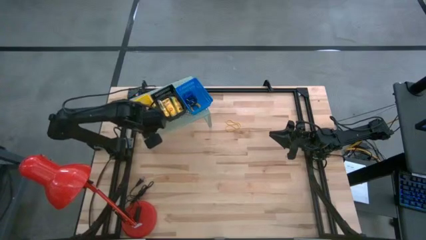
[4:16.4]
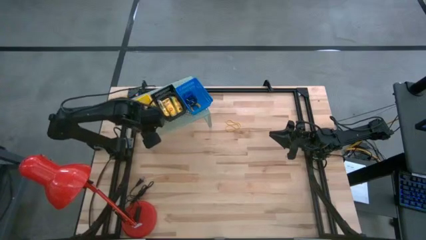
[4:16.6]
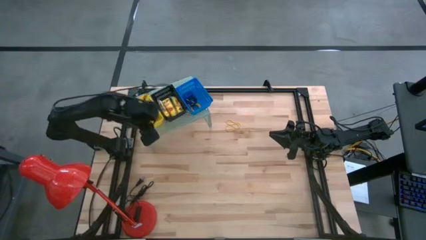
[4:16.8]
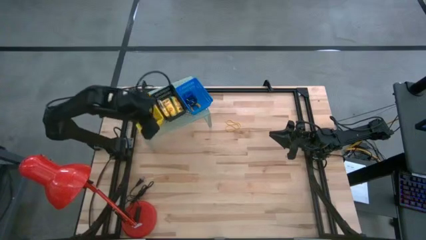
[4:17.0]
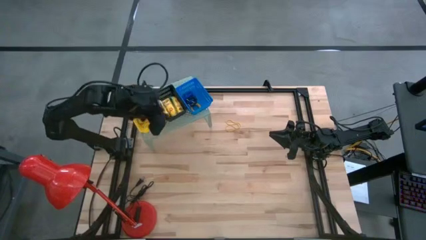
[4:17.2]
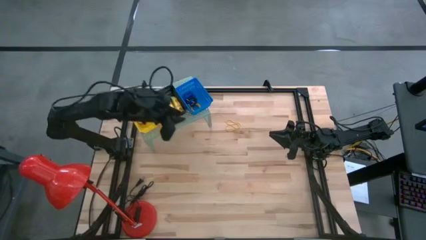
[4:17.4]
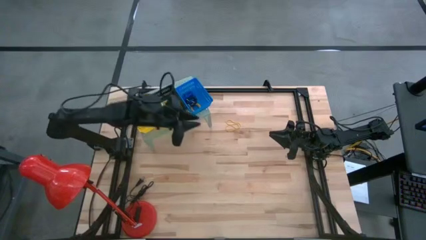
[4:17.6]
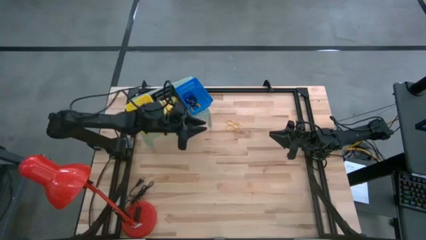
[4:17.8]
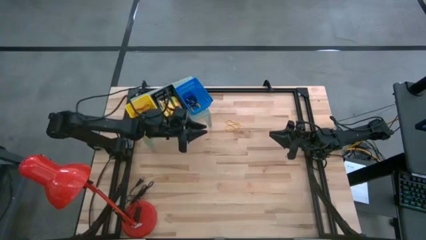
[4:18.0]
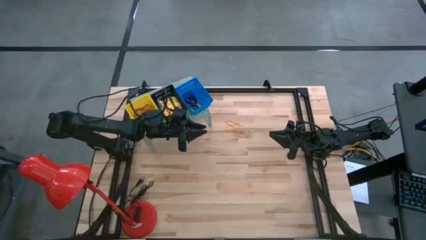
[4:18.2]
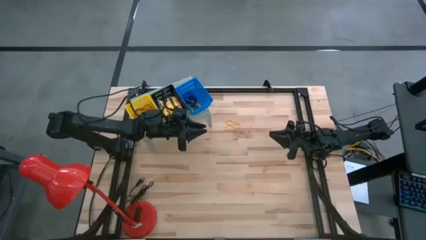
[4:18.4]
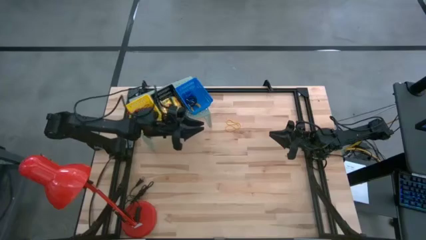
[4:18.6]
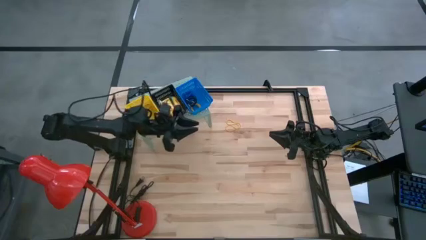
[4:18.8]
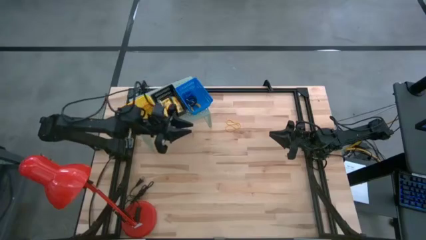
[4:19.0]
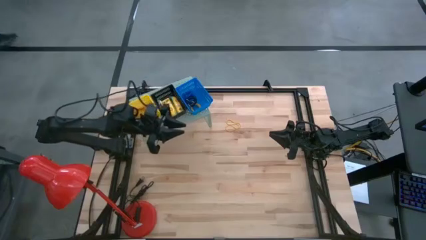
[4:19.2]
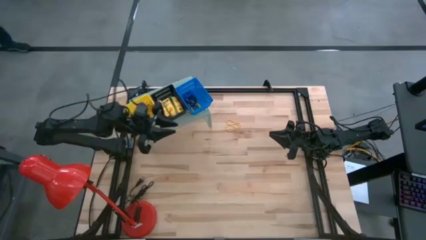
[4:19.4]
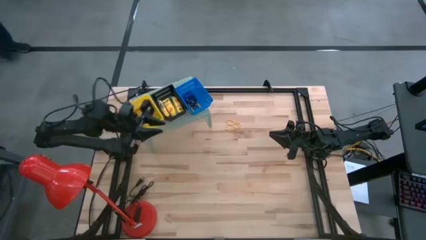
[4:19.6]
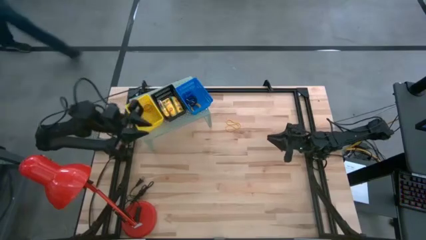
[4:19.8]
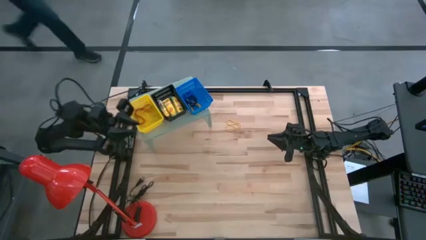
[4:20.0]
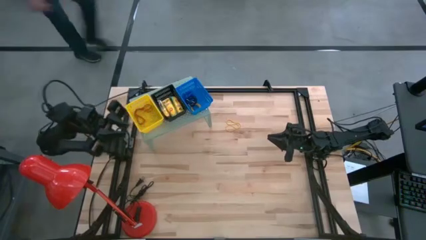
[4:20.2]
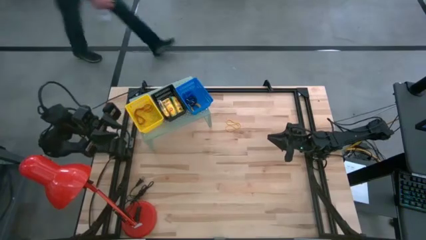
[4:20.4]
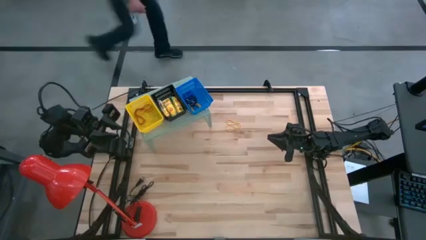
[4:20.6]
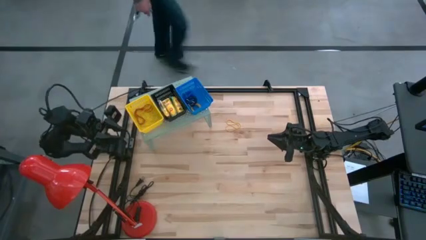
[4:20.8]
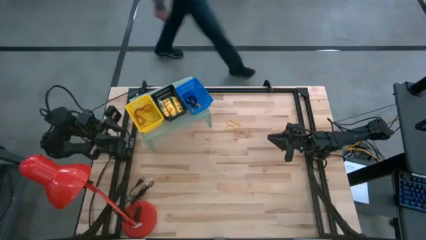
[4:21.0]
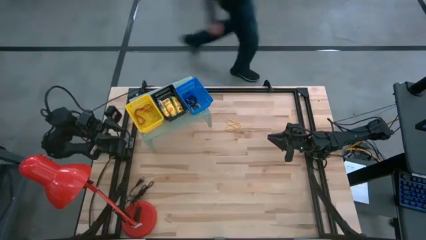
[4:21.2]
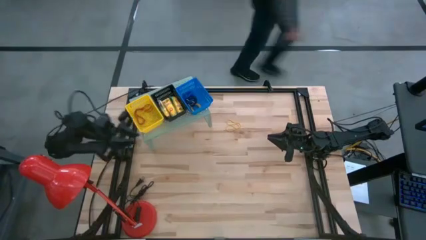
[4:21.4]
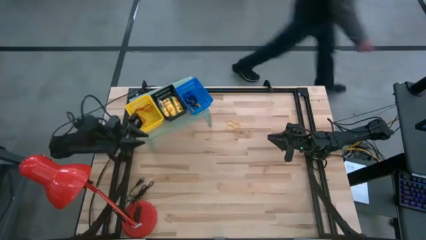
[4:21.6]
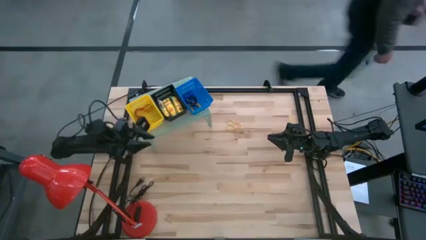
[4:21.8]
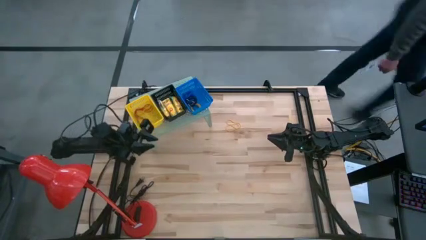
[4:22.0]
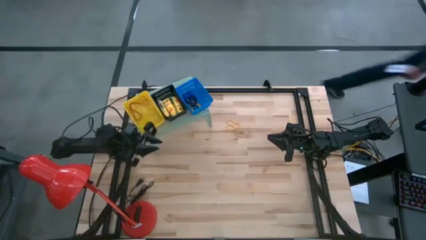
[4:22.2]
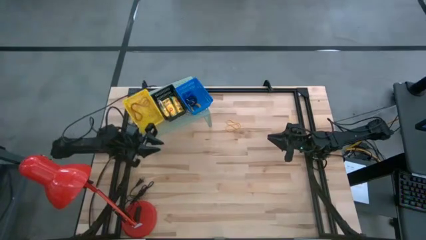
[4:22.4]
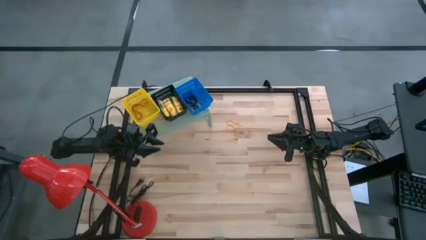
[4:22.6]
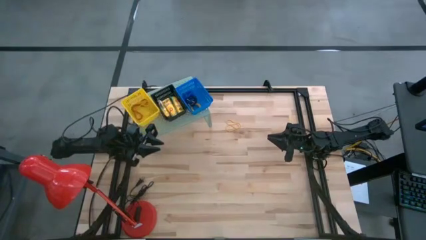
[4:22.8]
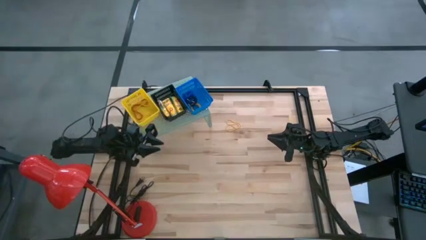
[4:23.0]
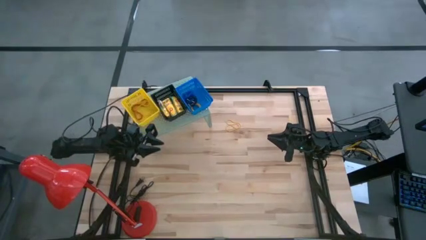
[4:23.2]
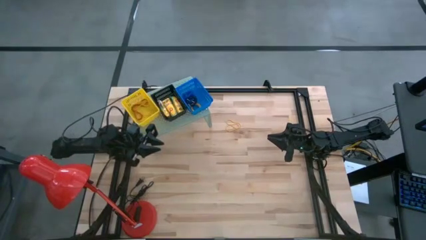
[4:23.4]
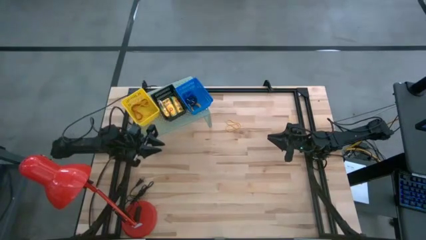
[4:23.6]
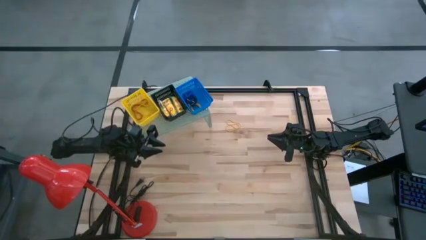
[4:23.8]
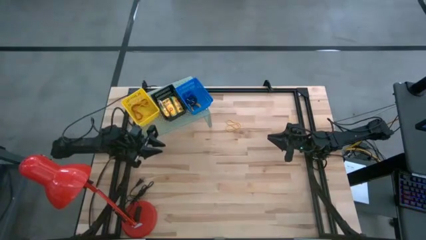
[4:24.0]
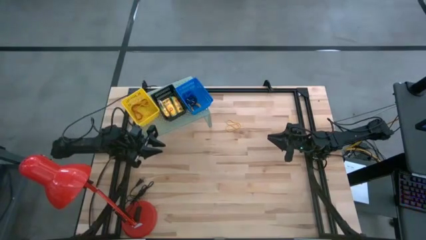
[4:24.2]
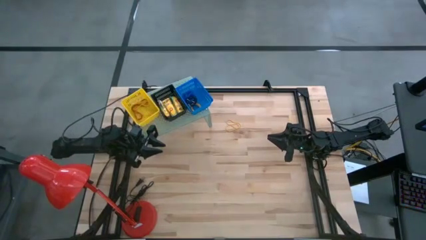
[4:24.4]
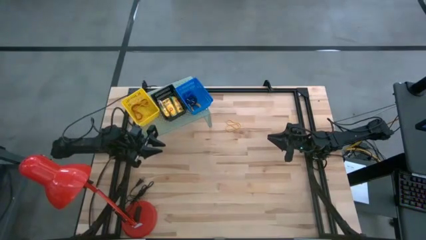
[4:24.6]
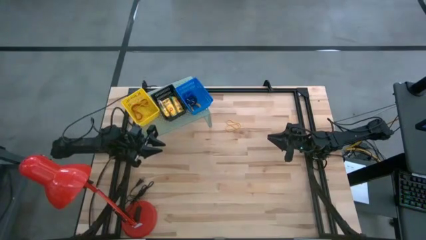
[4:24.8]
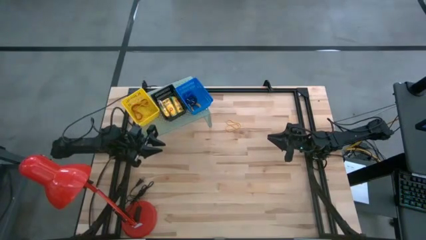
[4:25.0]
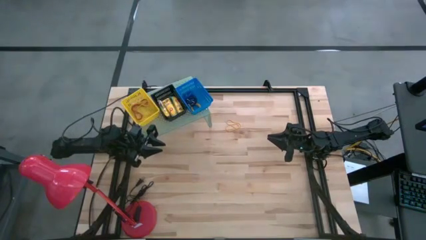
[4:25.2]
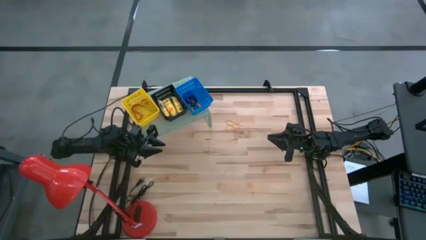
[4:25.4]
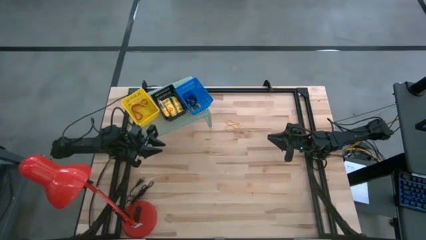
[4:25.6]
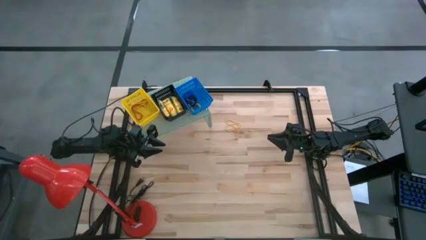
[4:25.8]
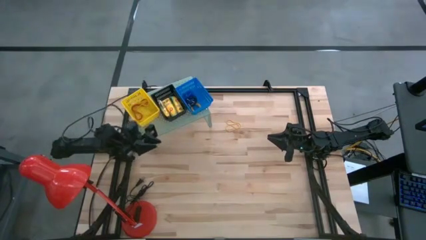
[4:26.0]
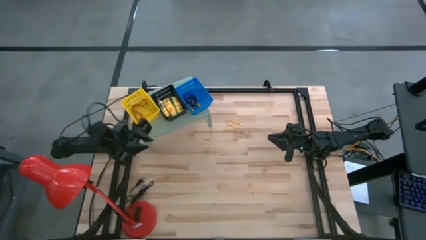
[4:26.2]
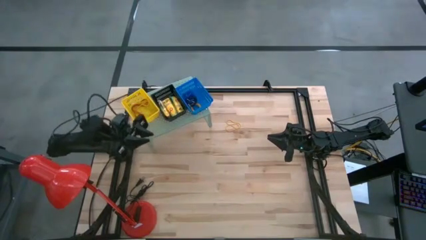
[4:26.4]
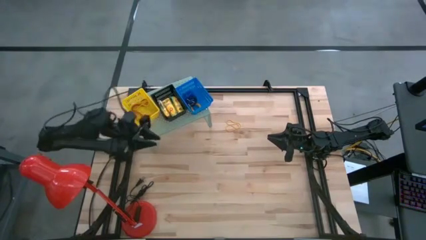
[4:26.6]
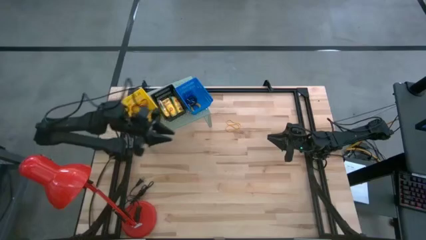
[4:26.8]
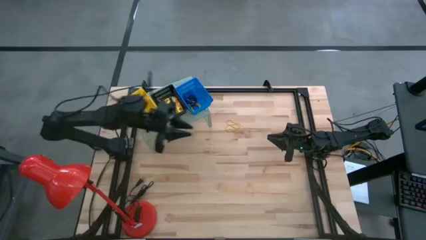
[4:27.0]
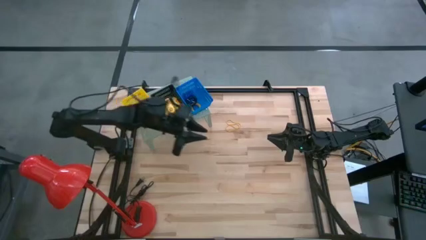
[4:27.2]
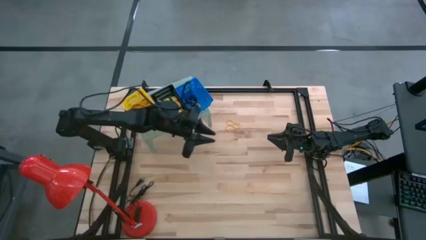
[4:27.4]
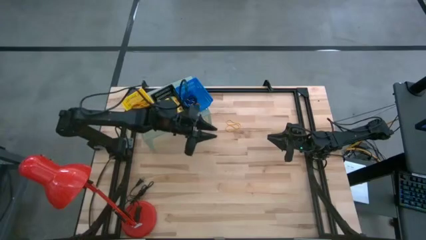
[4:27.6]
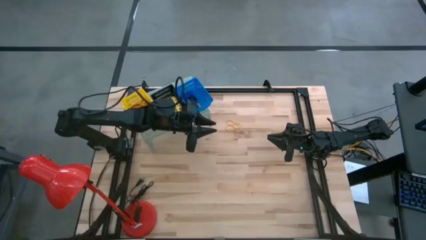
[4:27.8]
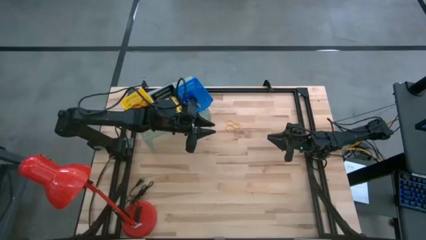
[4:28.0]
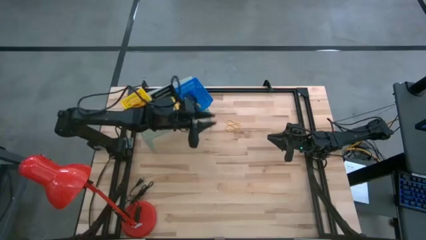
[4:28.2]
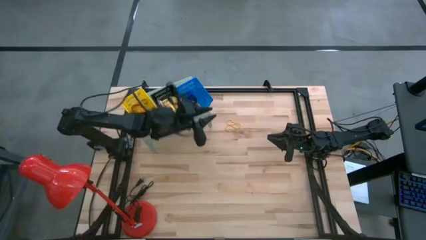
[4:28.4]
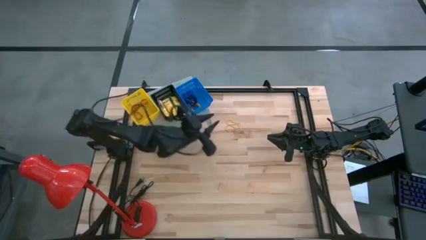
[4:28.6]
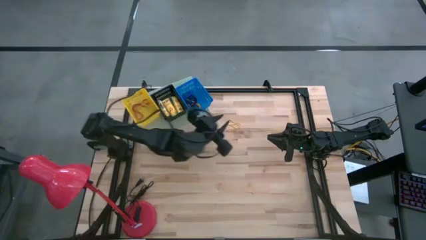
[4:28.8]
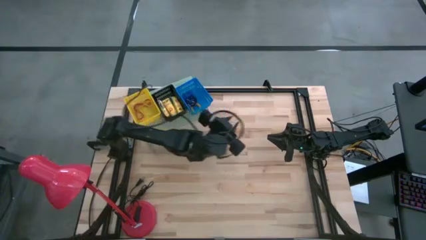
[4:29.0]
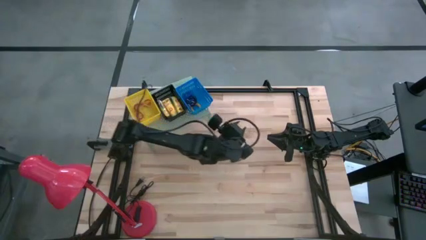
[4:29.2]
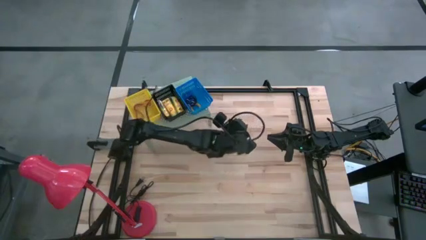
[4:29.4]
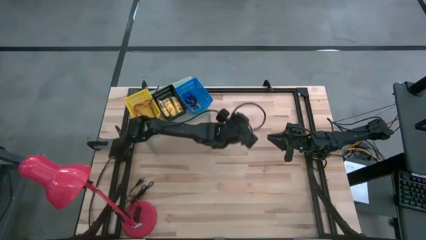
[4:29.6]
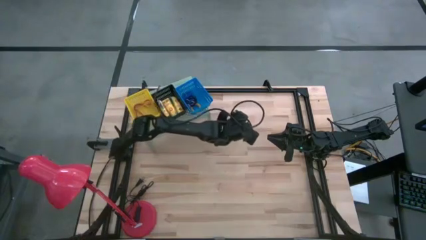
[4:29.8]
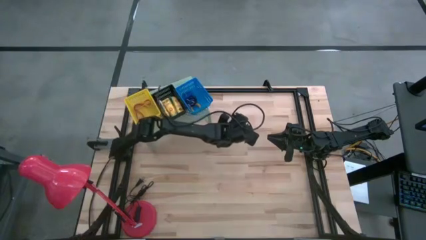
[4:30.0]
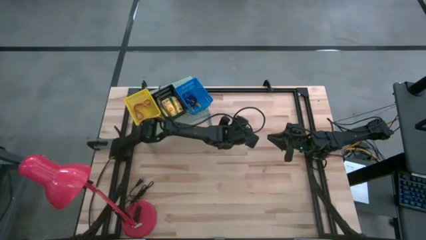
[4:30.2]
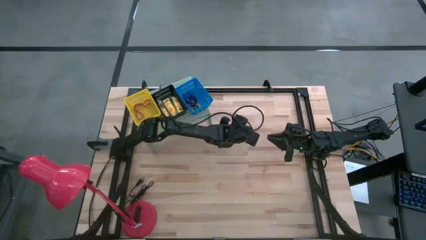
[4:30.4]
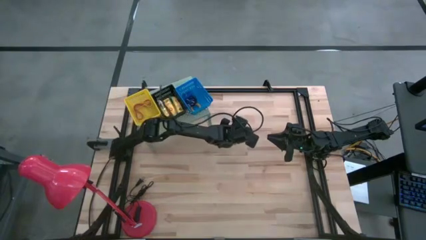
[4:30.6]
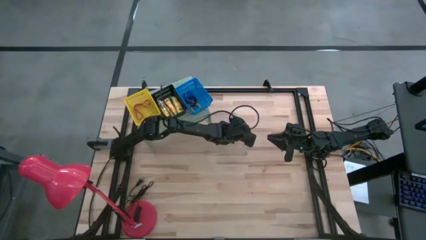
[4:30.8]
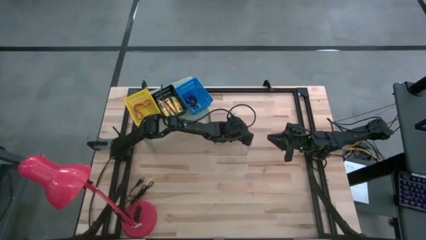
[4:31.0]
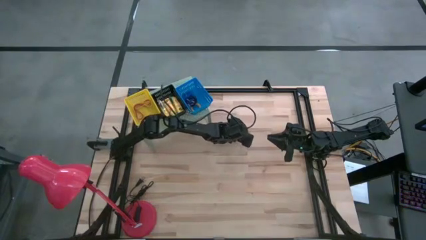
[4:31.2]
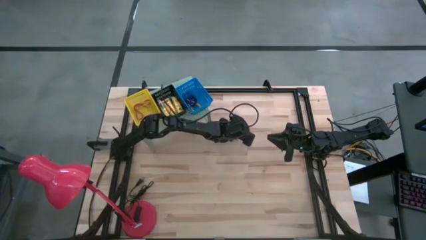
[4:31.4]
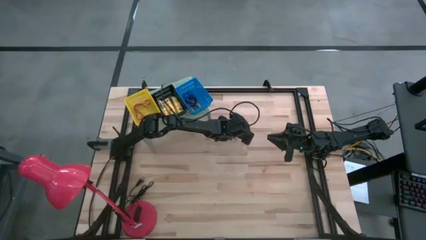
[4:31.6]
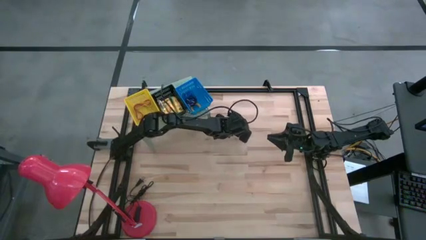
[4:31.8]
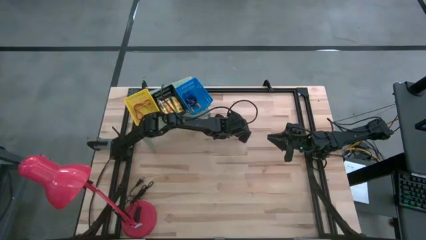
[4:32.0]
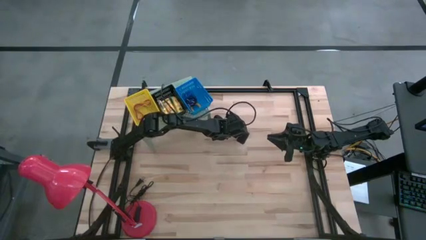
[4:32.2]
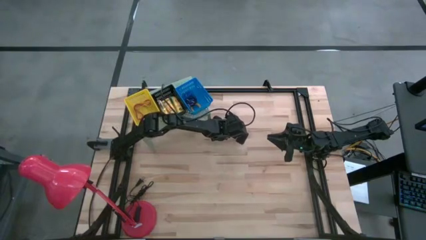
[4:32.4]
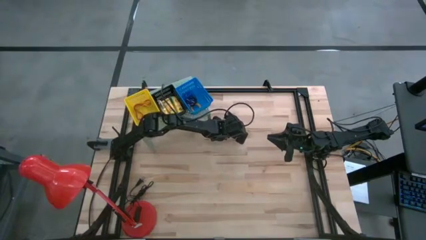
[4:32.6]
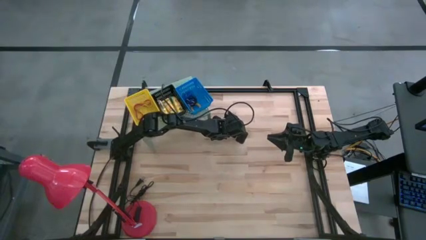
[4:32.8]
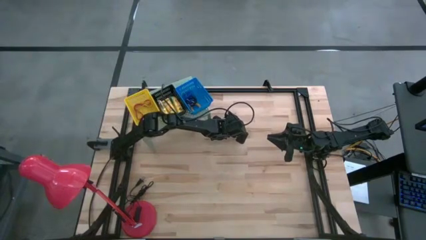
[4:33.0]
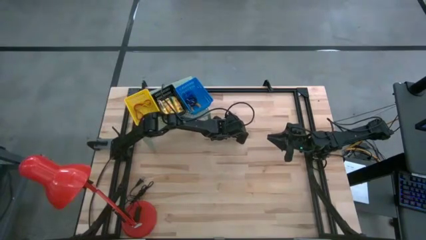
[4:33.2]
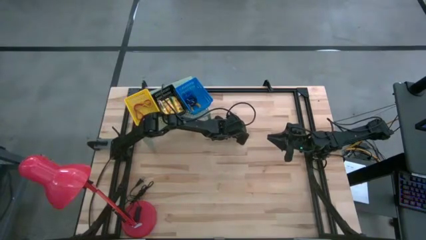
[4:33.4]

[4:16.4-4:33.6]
Task: Pick & Place Office Desk Supplies
Put the yellow rubber band into the yellow basket on the shelf
